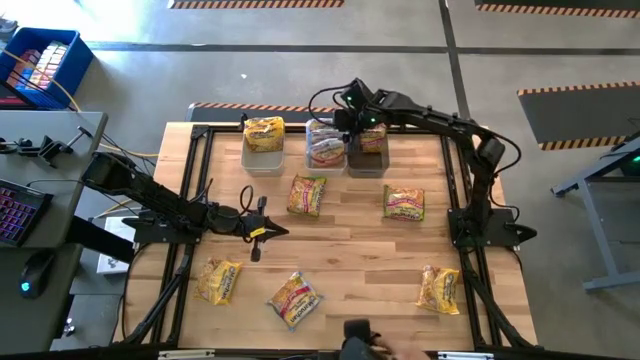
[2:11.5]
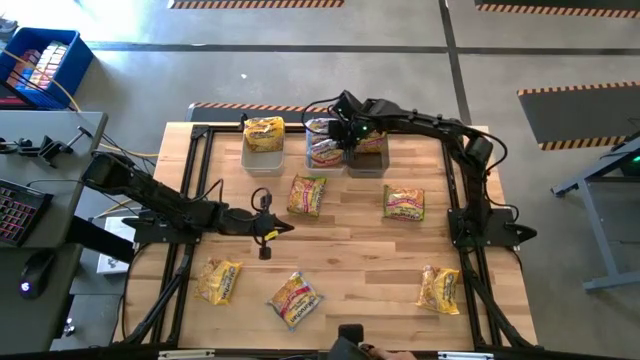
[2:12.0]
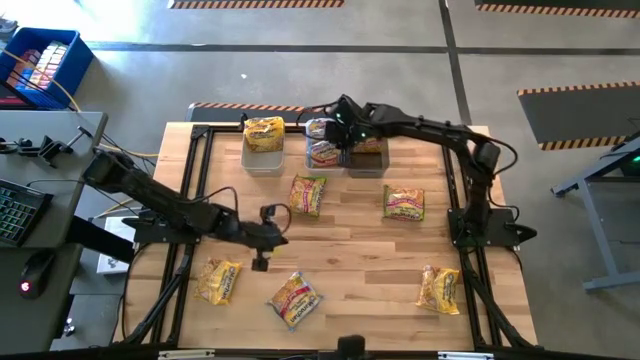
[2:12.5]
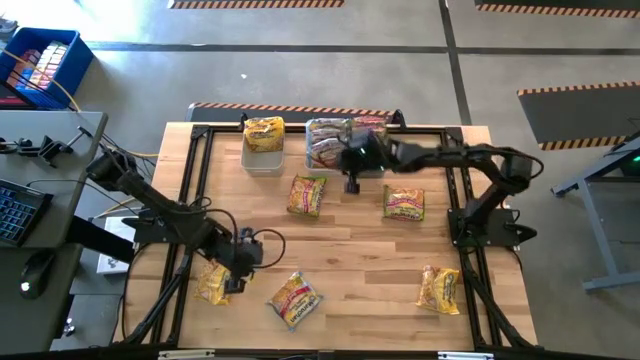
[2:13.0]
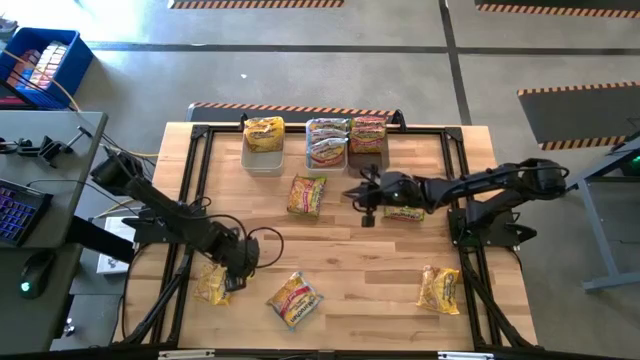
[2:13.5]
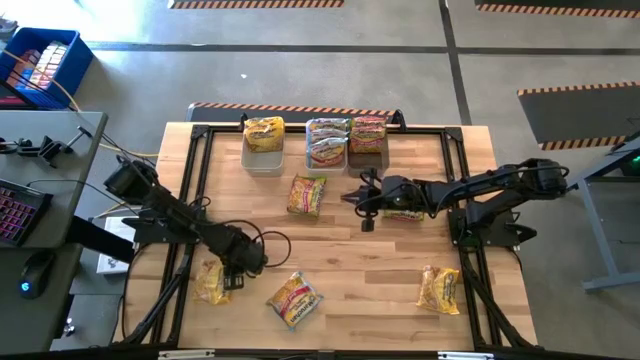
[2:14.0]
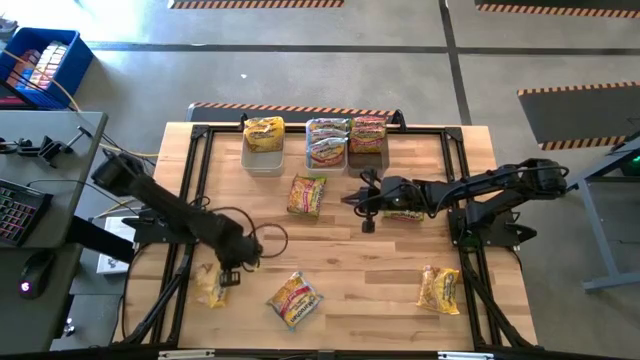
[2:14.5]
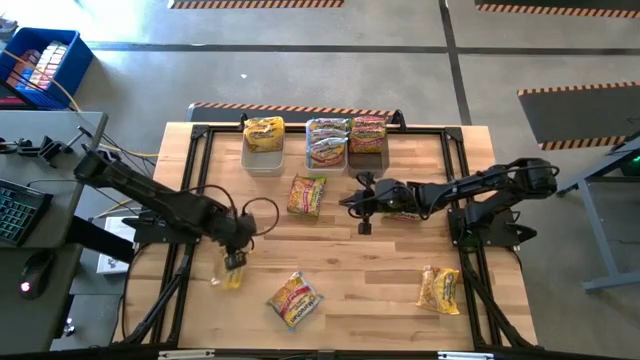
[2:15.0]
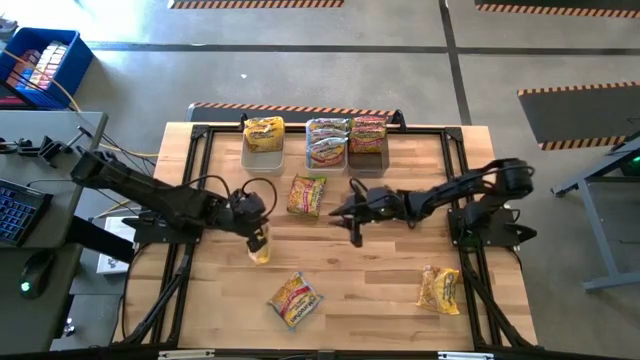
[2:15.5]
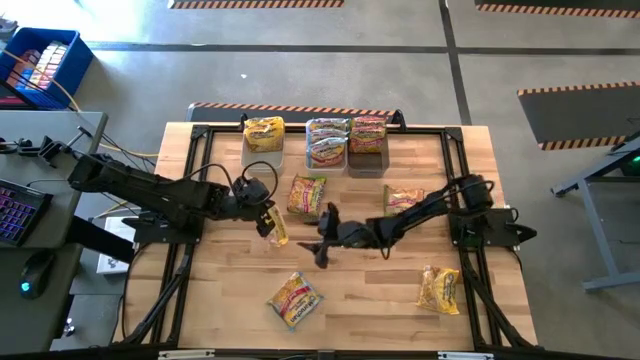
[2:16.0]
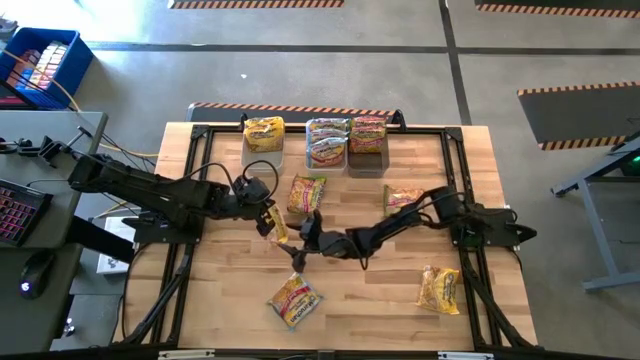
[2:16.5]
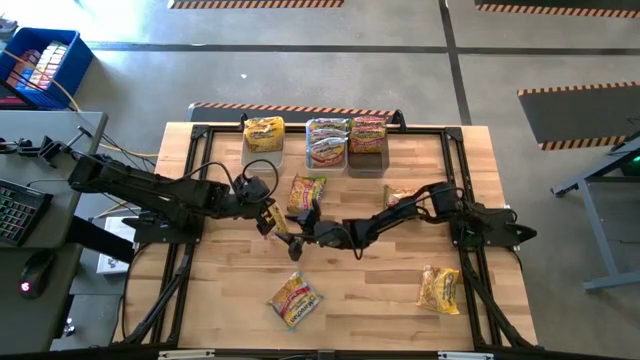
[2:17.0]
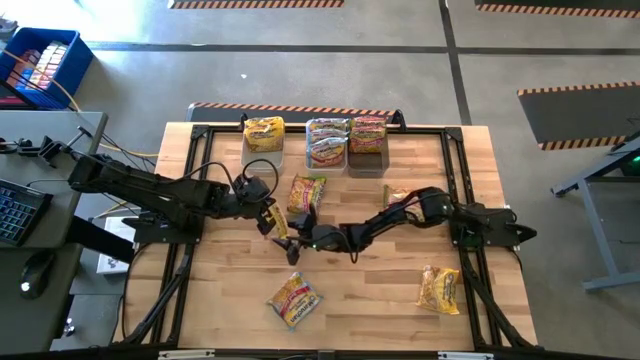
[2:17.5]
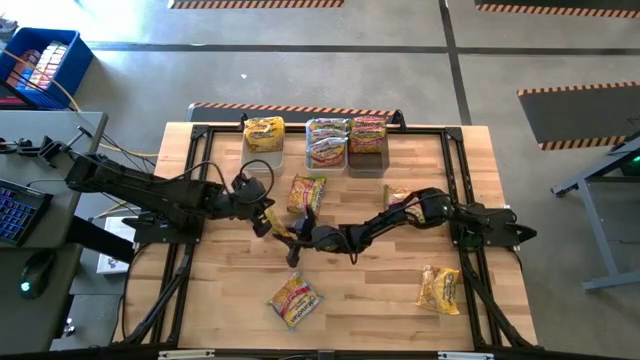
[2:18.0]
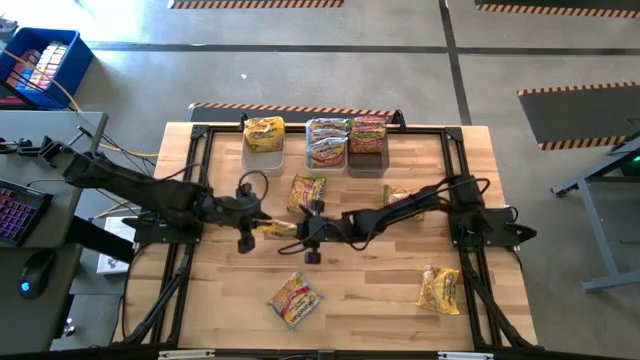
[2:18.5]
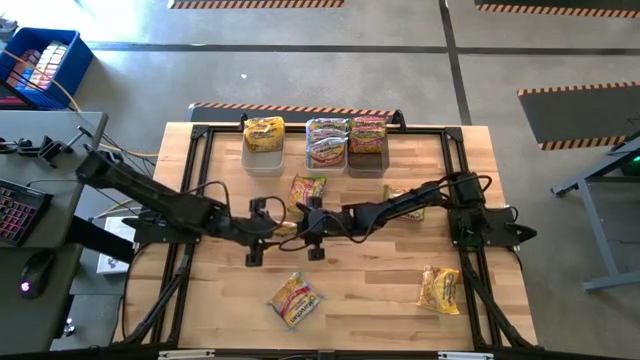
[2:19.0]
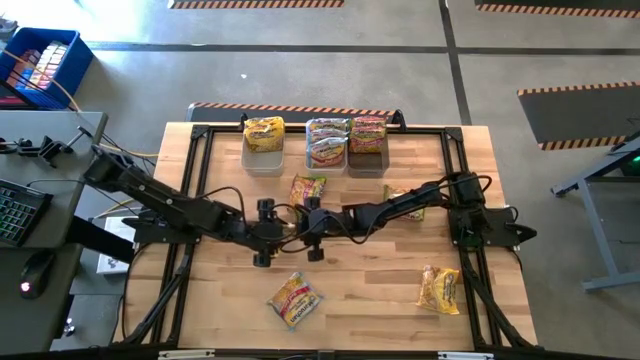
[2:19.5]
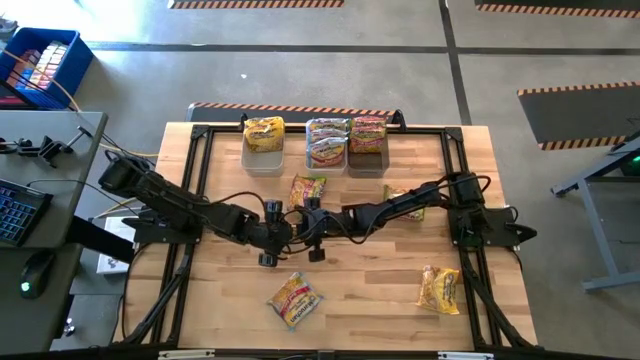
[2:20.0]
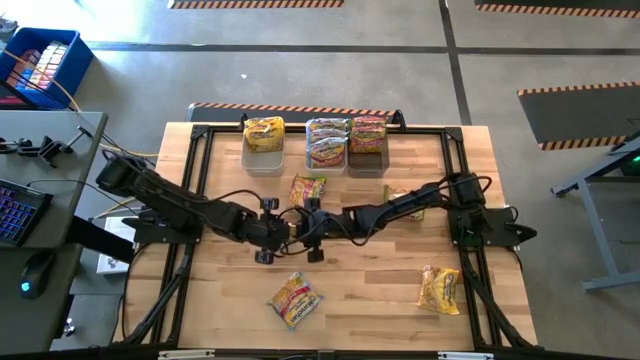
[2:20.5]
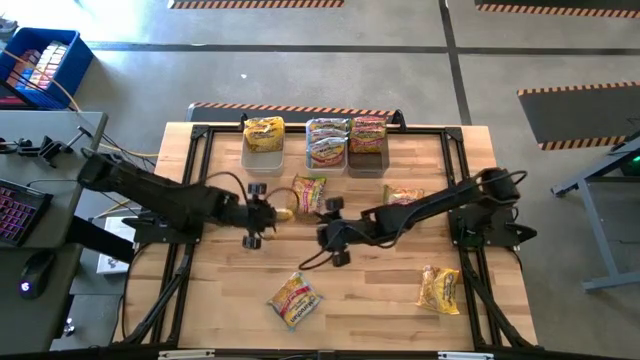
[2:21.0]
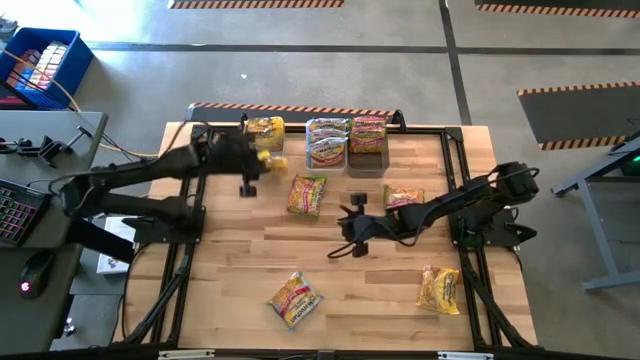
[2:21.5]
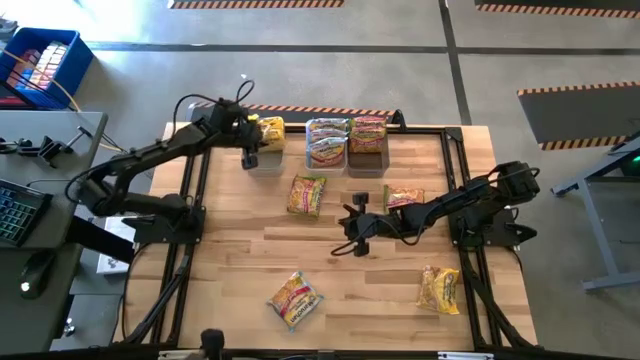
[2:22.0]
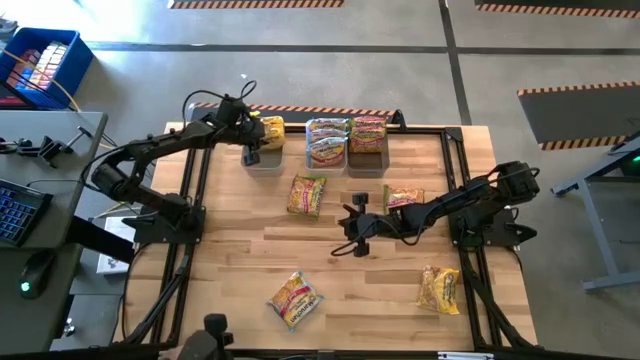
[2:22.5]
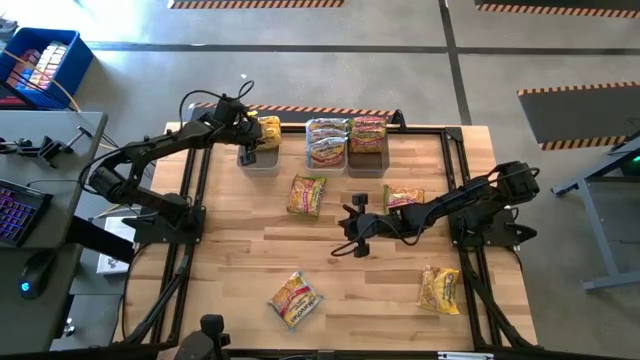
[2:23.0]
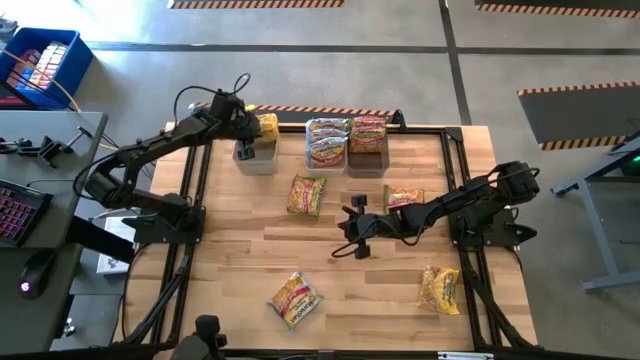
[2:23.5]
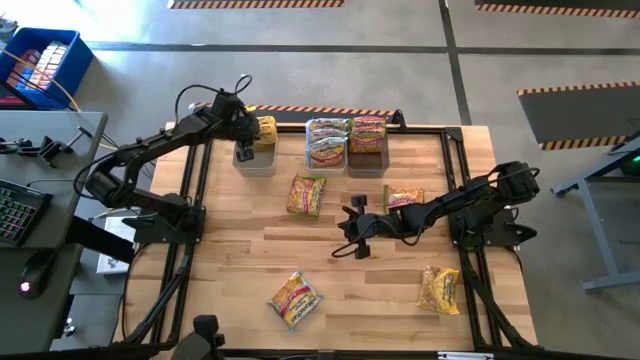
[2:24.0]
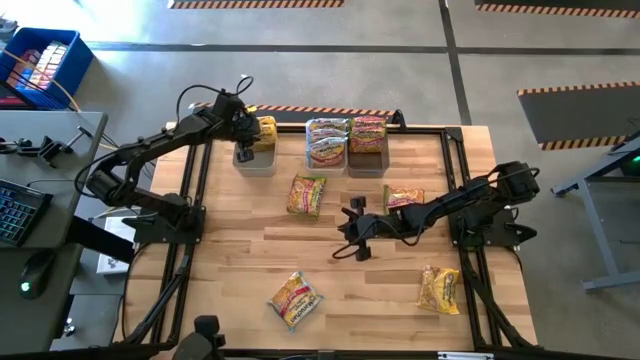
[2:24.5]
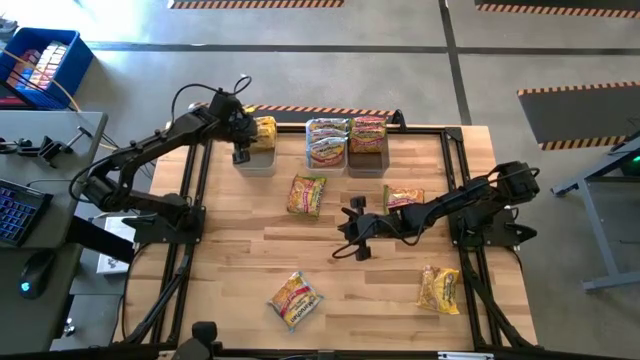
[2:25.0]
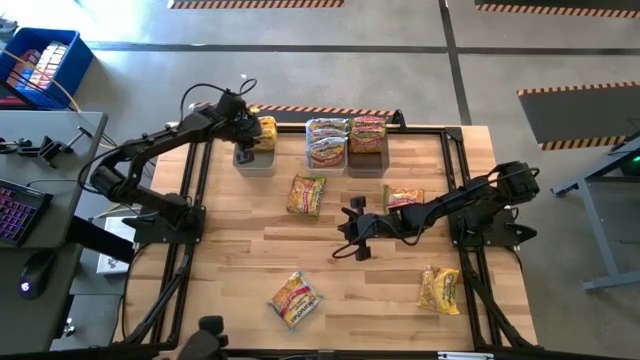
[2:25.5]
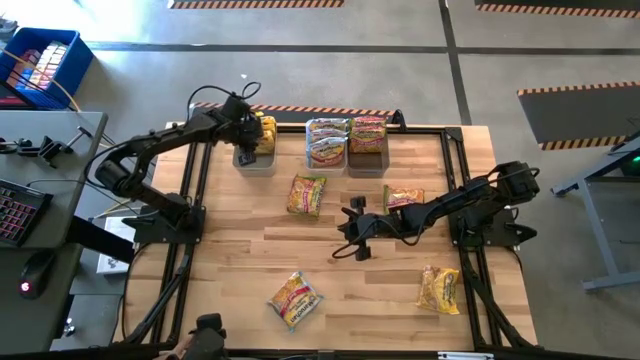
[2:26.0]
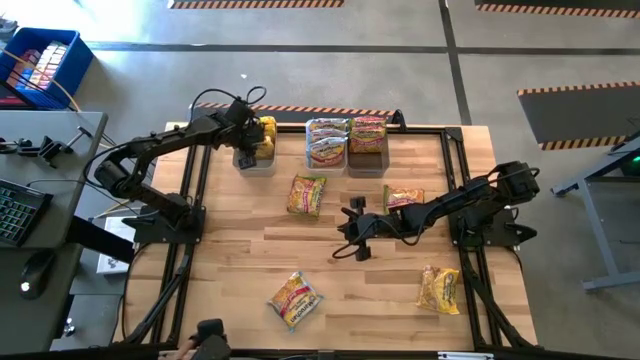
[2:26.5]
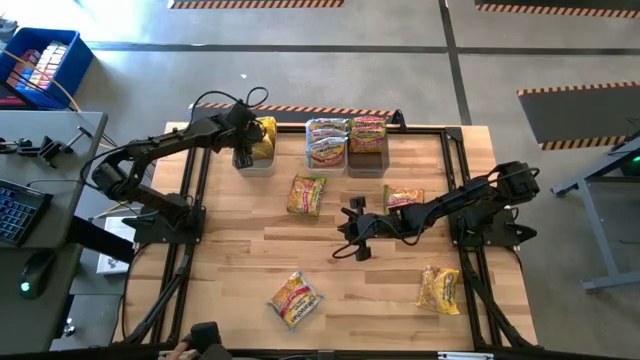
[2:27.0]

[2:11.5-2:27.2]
Task: Sort Maruchan noodles
Put the bottom left yellow noodle pack into the gray bin

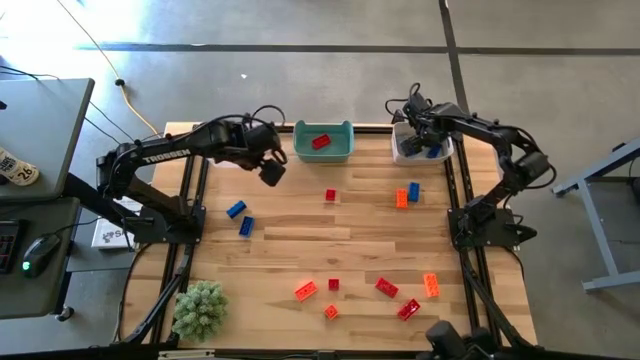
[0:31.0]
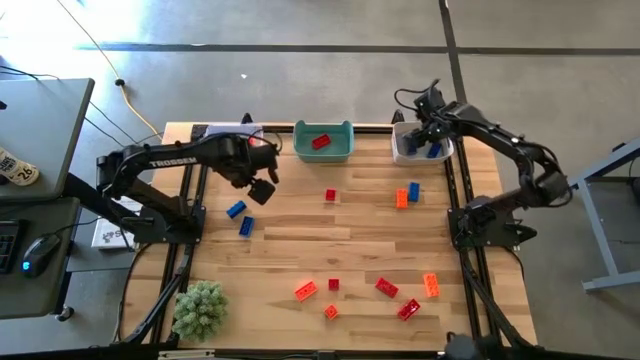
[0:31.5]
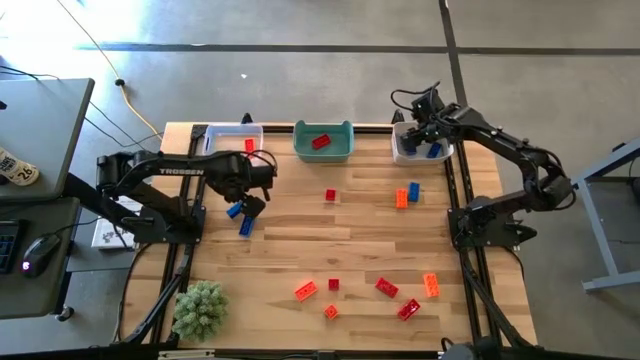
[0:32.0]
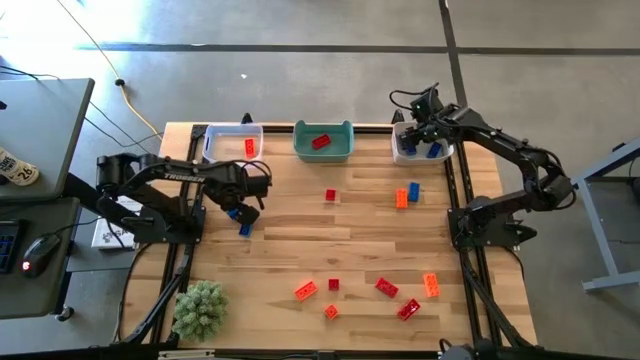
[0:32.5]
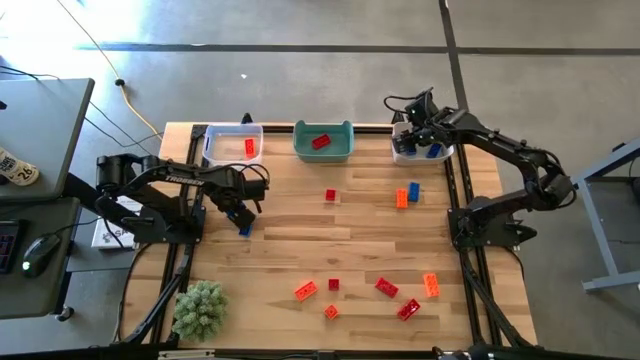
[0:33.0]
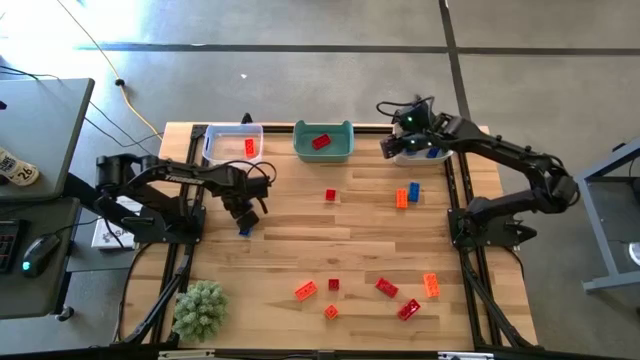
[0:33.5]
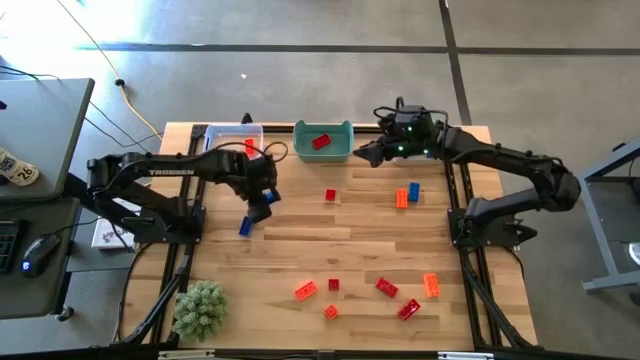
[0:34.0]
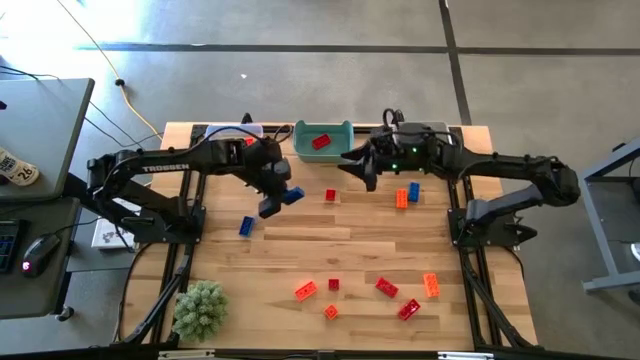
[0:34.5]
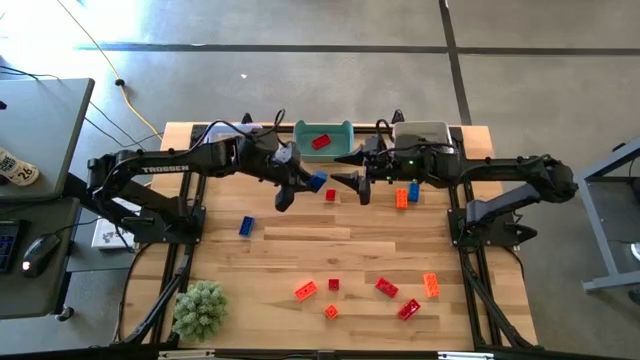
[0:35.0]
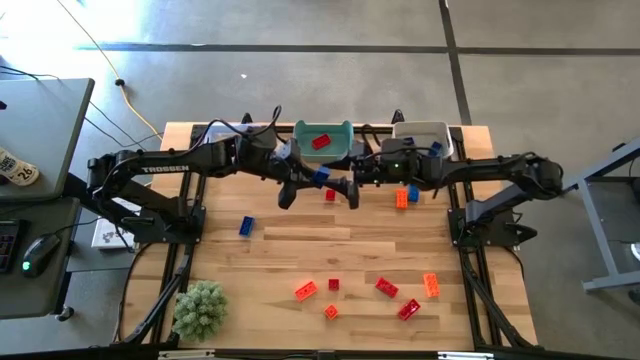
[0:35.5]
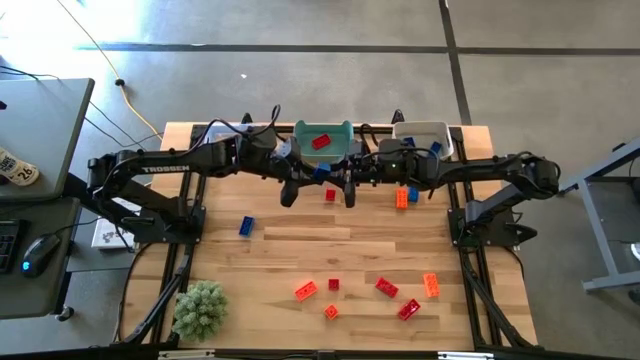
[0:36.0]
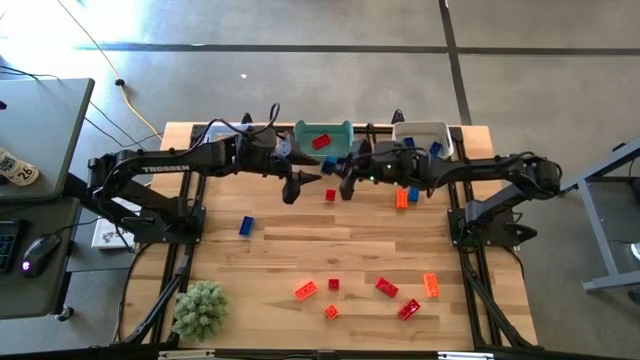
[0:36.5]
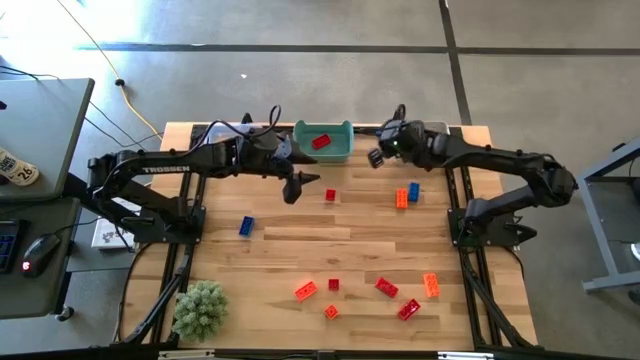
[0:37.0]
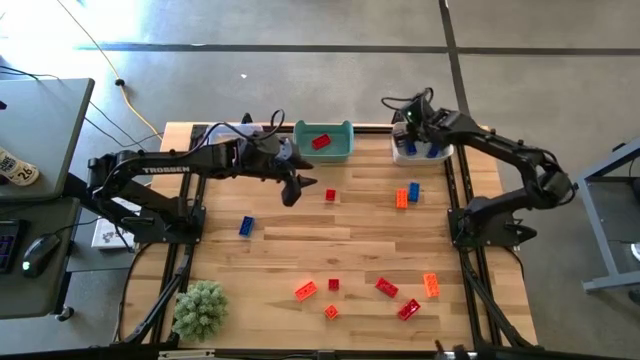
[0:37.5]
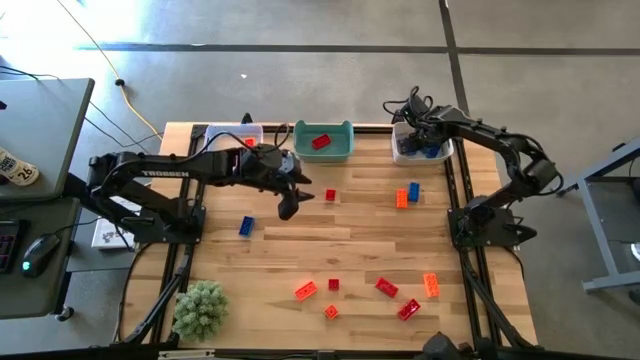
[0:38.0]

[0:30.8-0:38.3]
Task: Sort & place blocks by color
Put the blue game piece into the white bin
